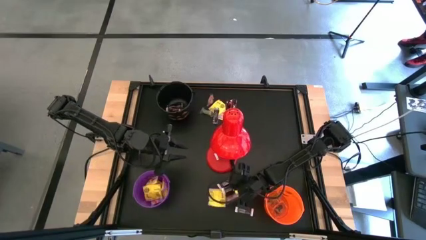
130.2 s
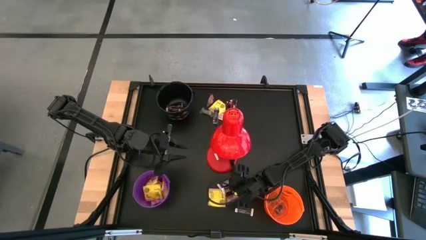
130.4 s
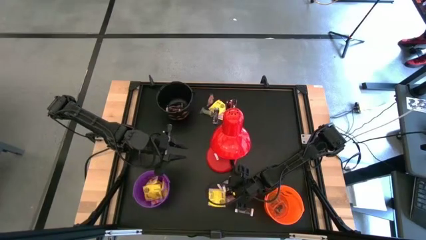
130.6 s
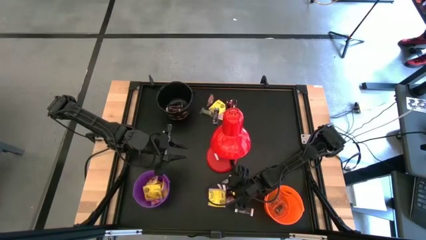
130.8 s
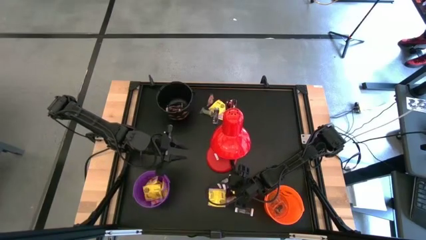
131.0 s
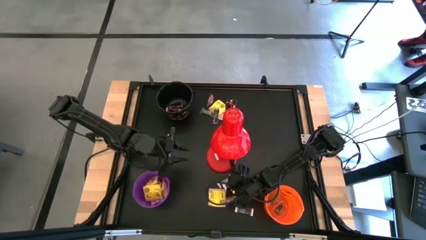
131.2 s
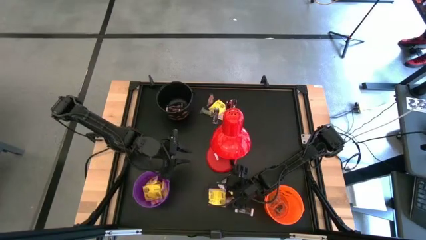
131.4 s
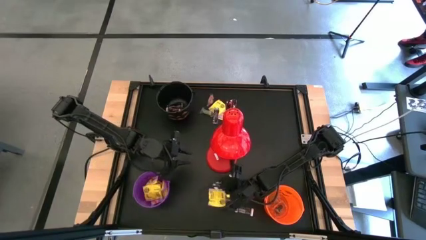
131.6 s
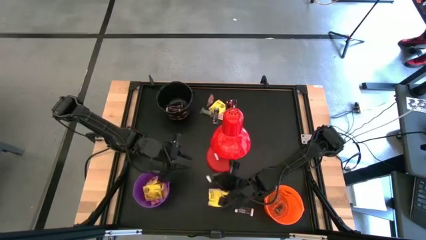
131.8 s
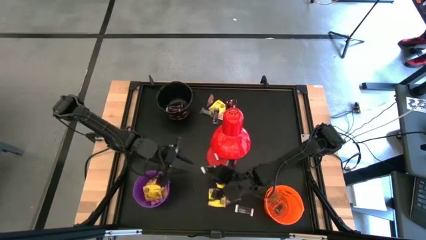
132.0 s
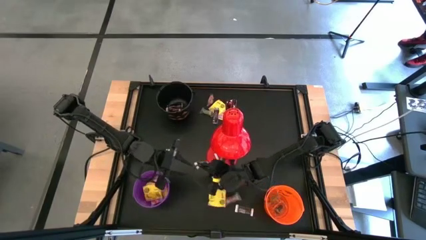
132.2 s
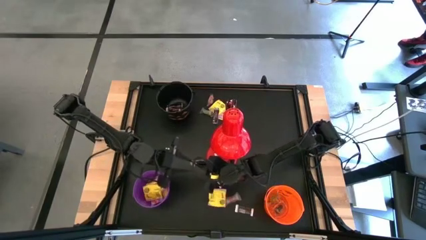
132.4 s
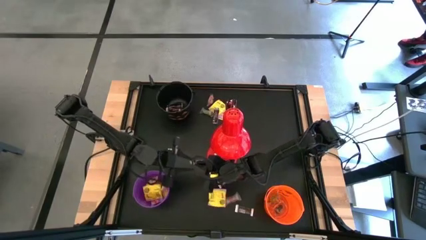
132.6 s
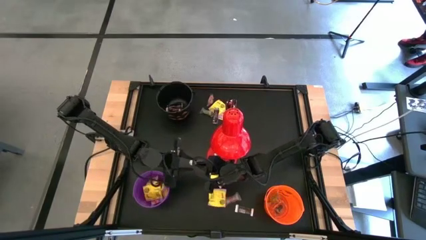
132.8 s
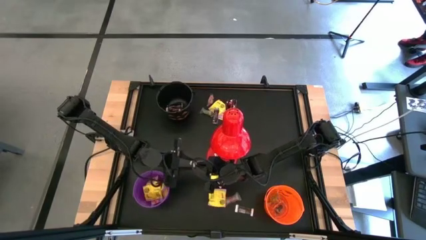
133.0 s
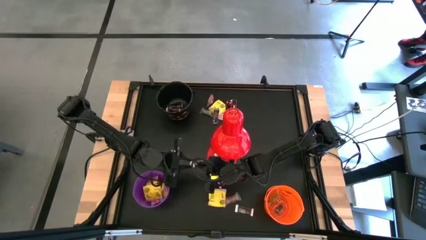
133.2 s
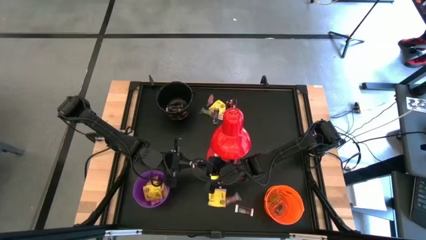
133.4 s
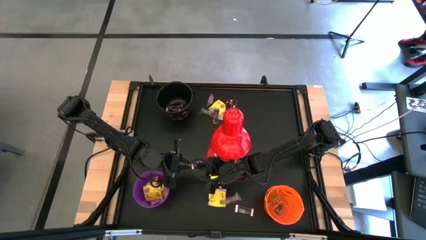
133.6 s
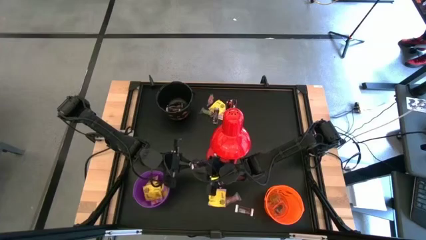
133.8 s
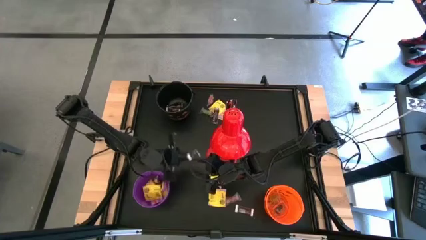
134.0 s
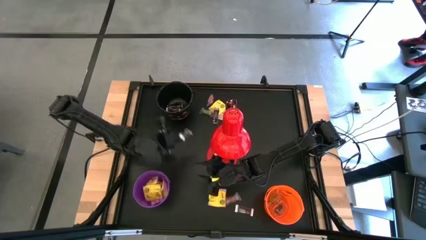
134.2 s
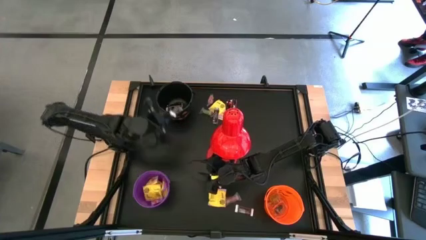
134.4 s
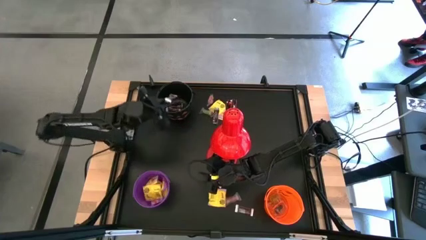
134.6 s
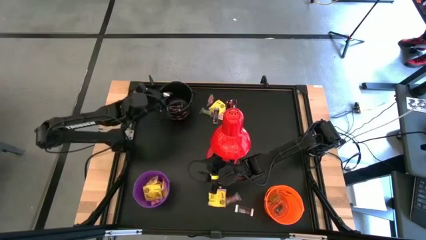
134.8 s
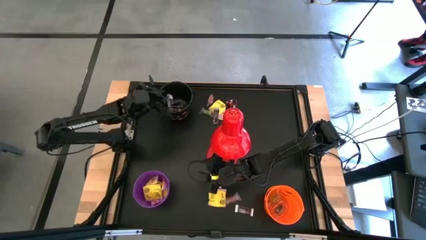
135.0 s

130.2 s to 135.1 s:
Task: Organize candy in baskets
Put the brown chocolate bar into the black bucket

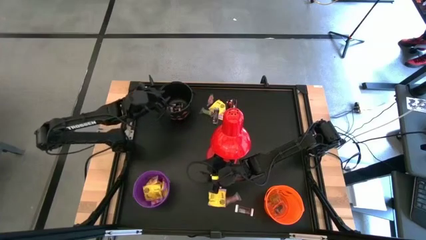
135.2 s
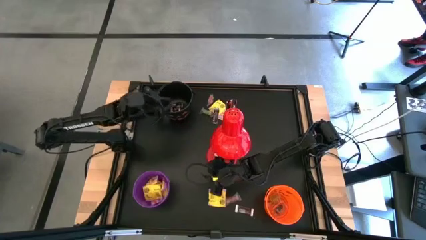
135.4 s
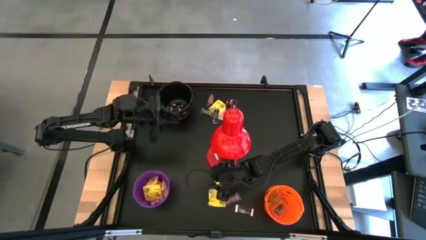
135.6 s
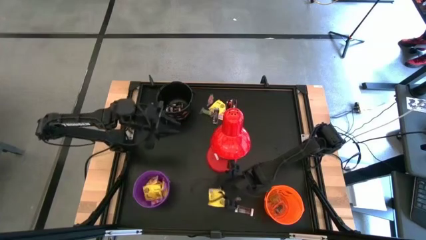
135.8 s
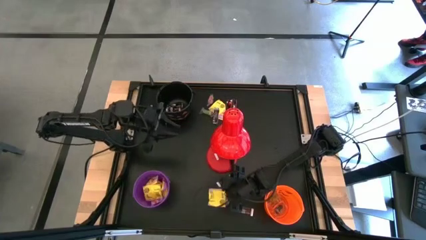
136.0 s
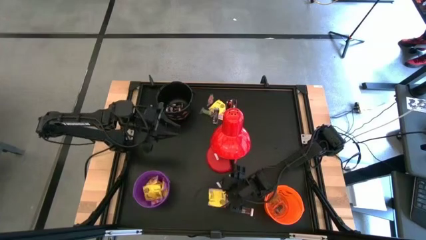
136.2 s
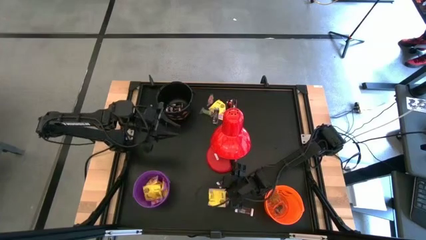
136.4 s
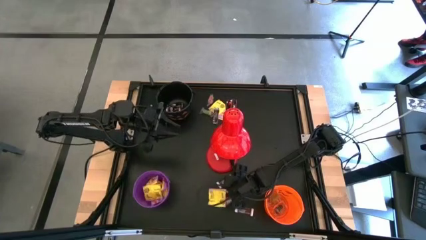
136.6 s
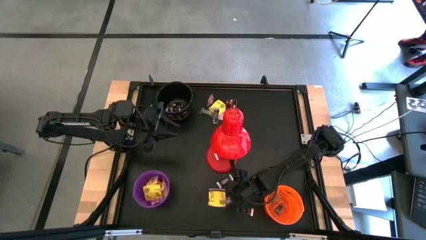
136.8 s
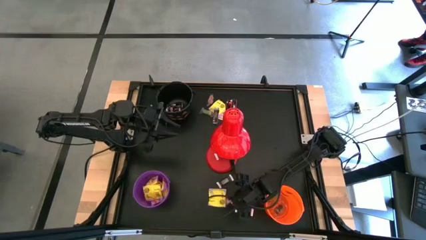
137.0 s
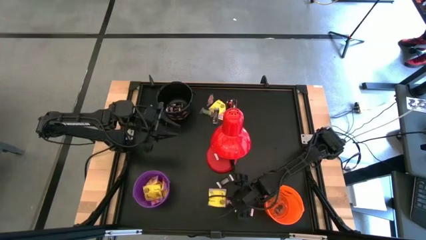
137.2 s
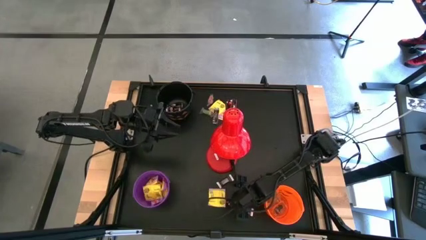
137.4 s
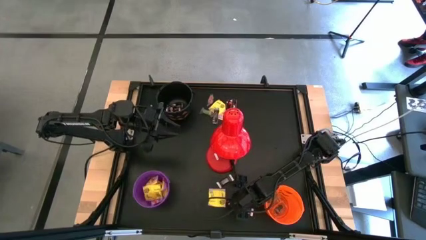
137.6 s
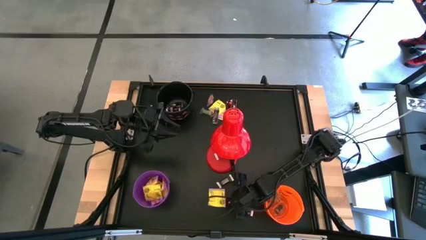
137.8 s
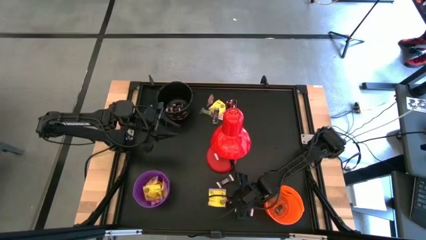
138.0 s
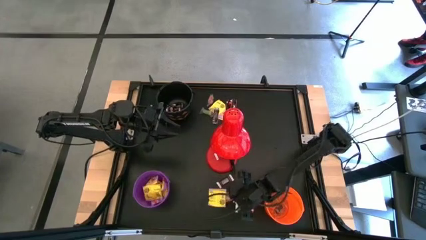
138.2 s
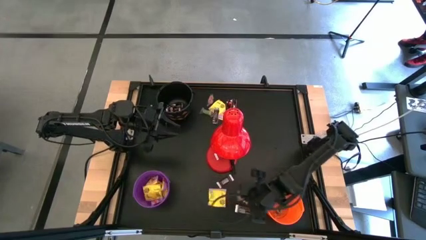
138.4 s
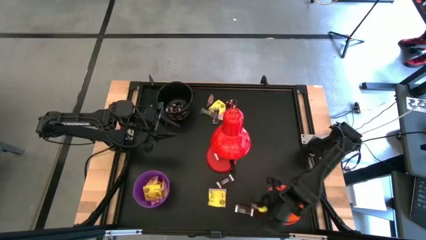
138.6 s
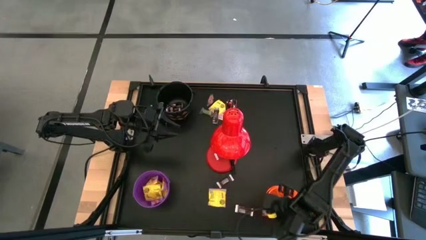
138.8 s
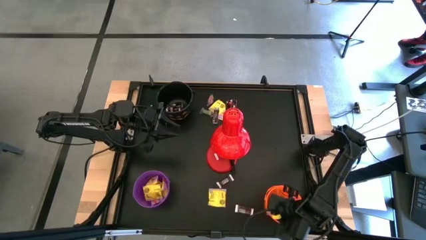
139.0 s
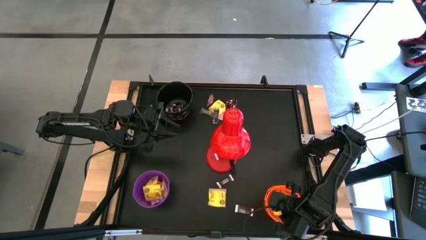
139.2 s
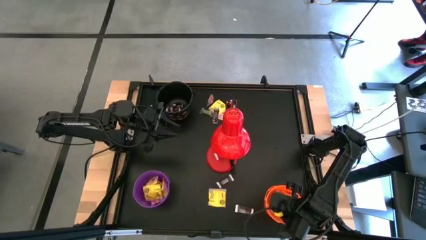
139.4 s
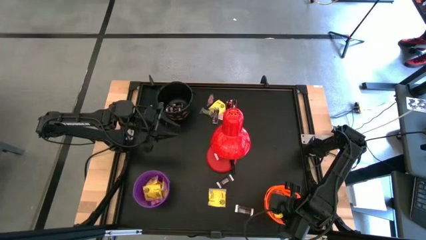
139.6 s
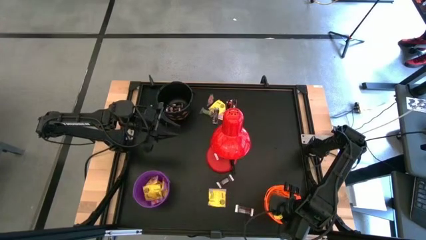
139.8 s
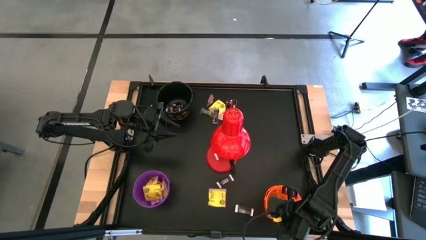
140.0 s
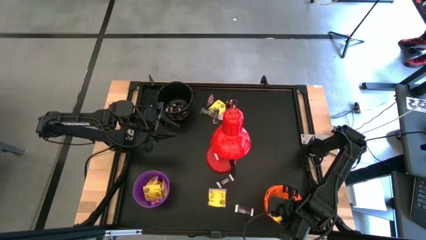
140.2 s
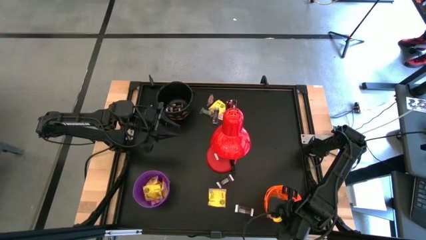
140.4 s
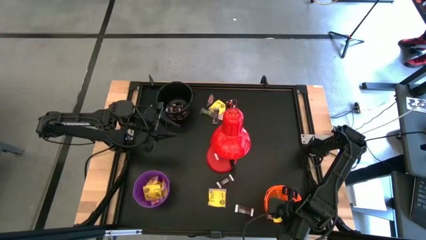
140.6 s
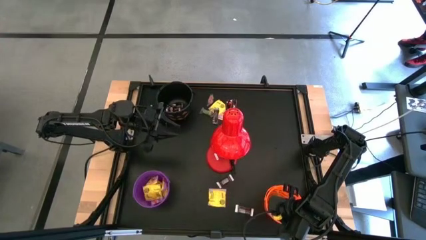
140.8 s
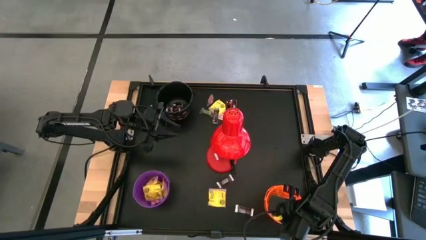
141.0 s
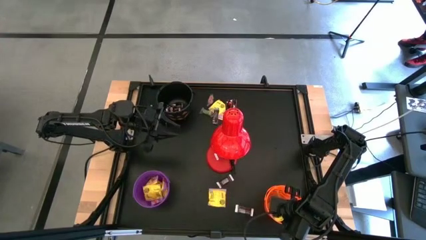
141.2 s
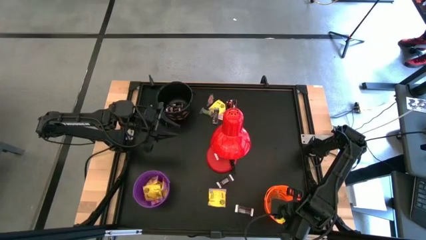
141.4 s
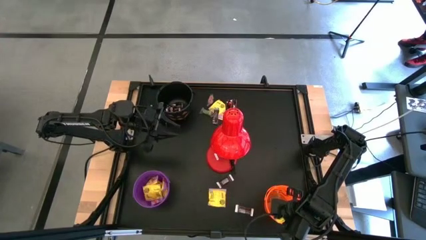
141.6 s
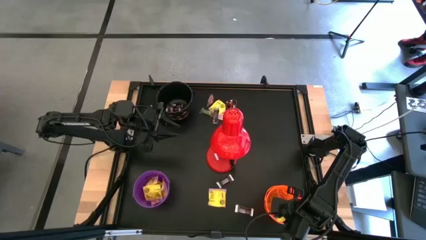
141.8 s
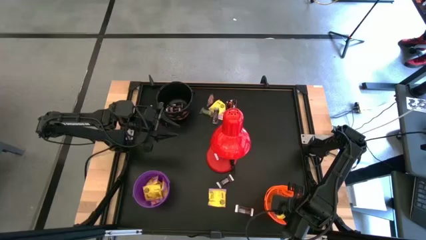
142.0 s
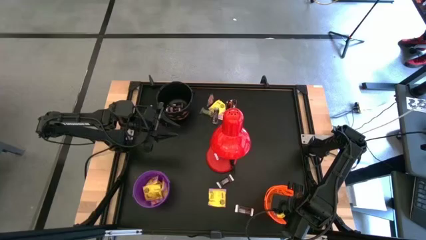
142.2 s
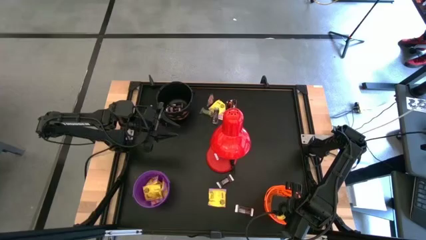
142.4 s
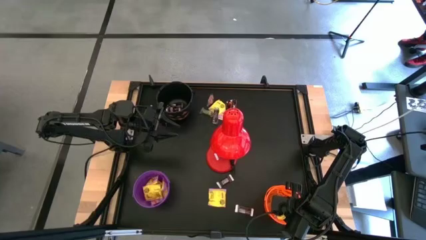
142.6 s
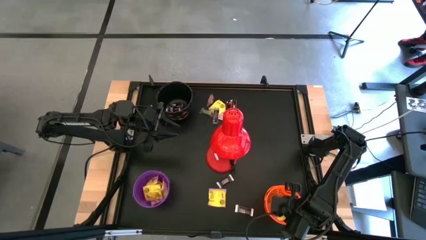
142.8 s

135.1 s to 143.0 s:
Put the red gummy into the orange bucket
